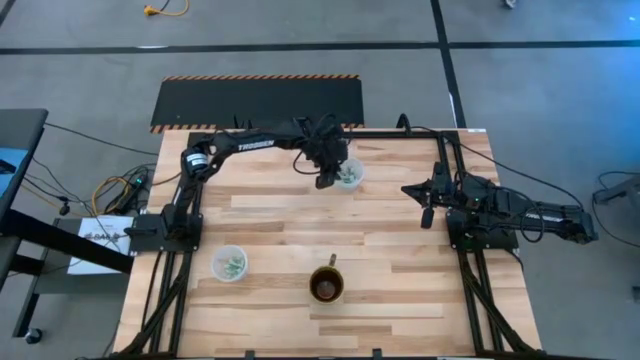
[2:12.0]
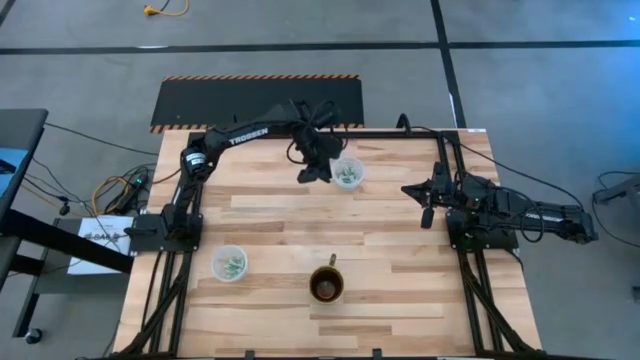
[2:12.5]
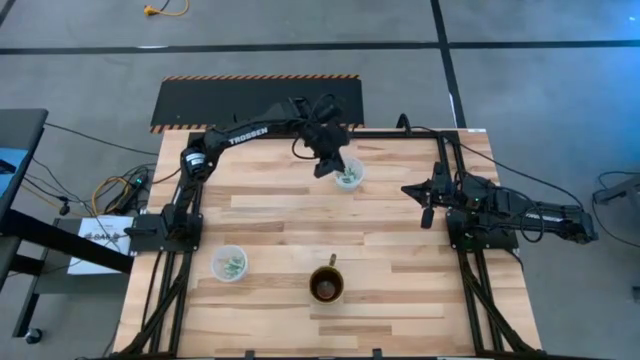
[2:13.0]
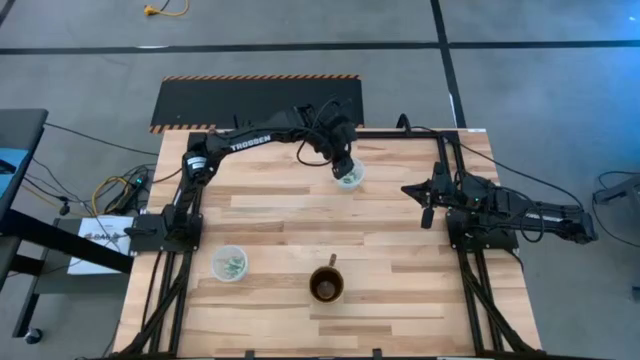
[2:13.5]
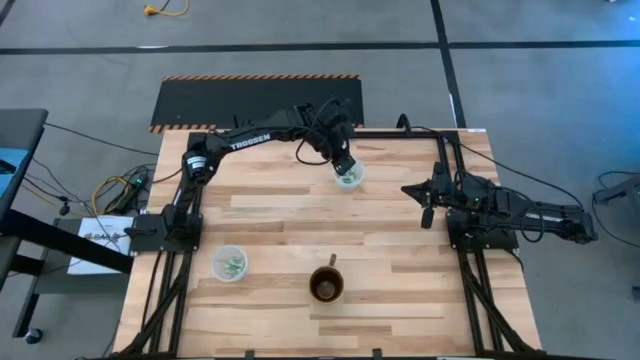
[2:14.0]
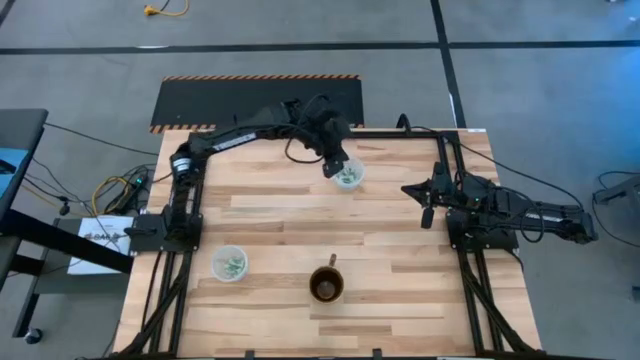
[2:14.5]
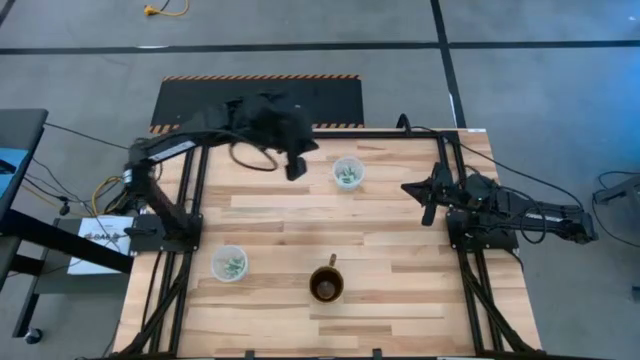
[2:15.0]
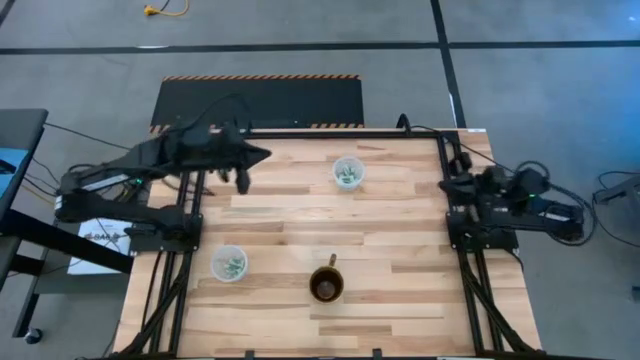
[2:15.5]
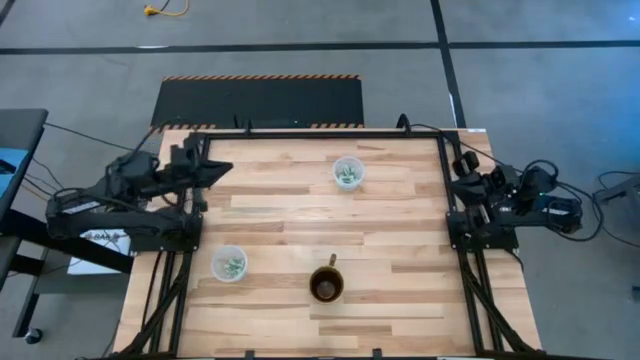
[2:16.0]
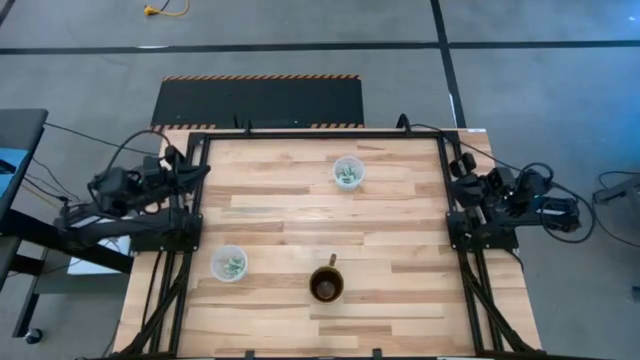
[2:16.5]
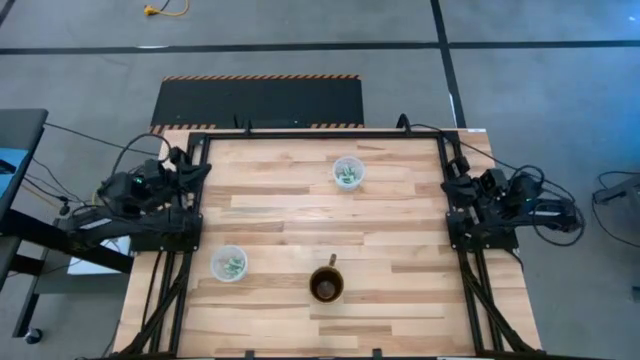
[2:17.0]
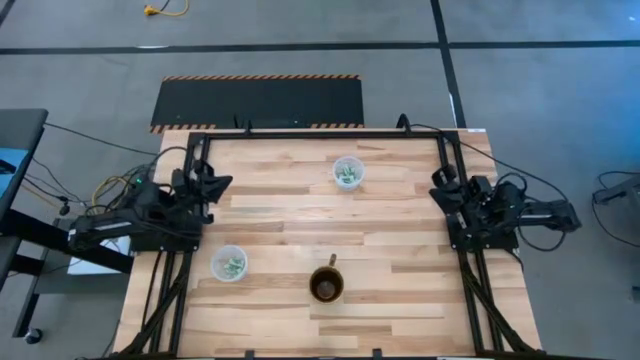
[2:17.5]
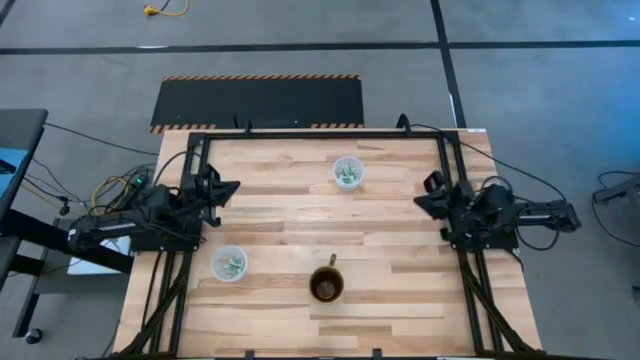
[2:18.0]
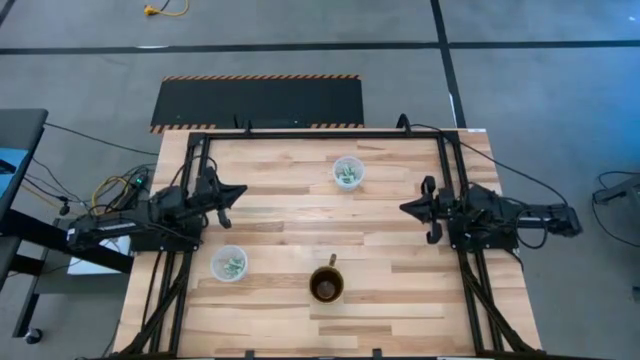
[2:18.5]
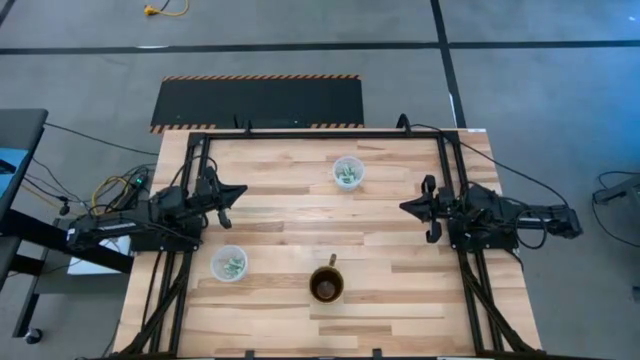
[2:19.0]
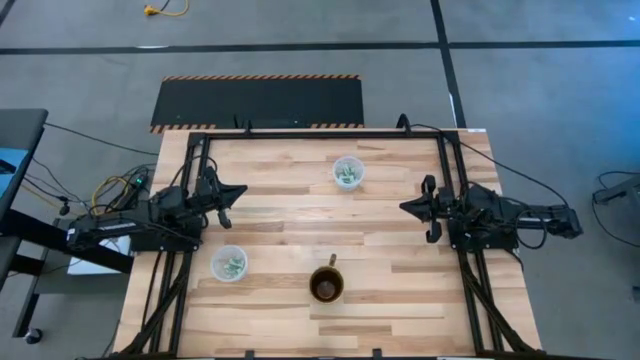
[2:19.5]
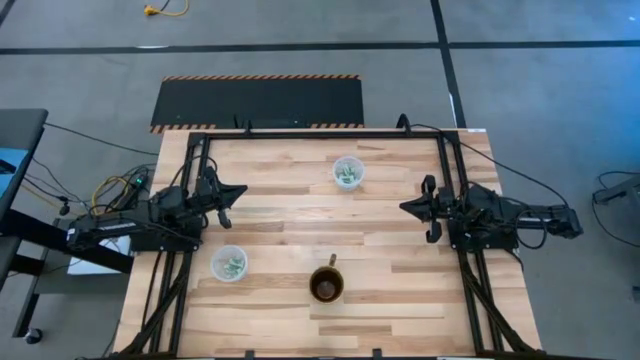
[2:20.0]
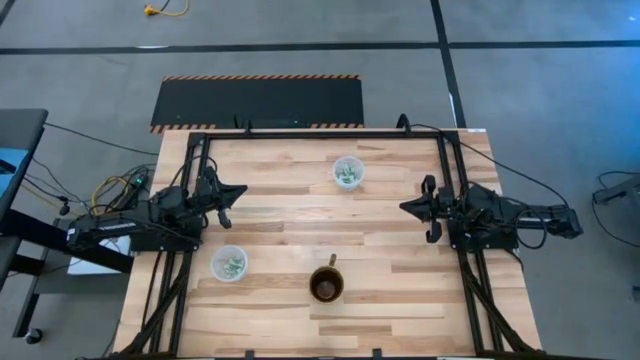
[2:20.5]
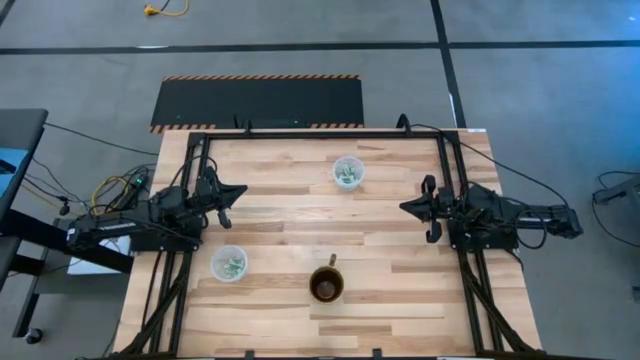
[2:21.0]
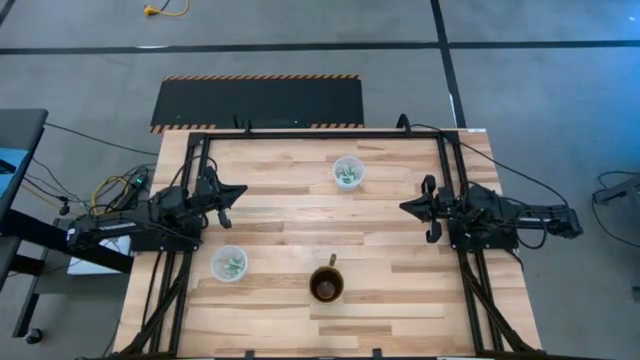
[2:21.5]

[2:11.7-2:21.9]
Task: Pick and place items into bin
Return to Home Position
